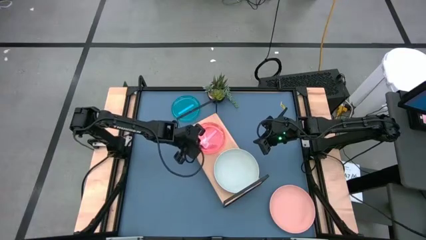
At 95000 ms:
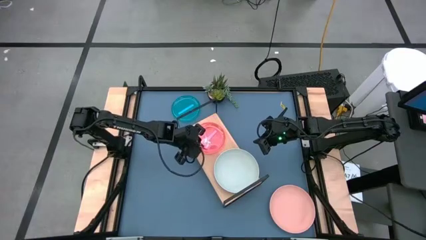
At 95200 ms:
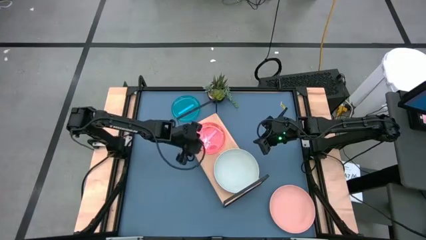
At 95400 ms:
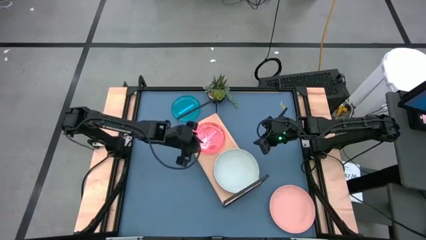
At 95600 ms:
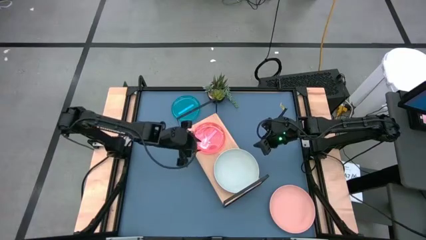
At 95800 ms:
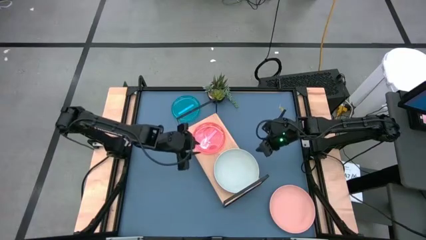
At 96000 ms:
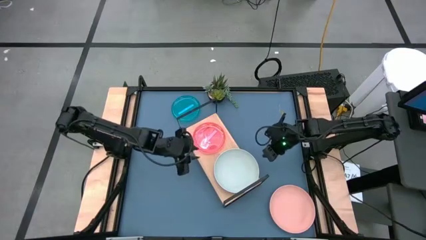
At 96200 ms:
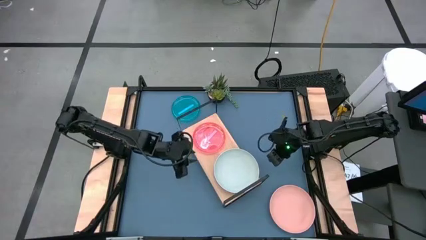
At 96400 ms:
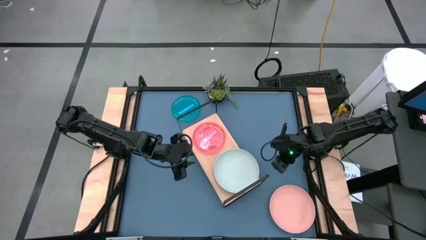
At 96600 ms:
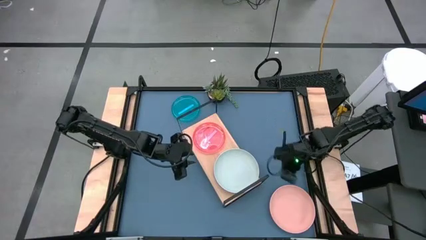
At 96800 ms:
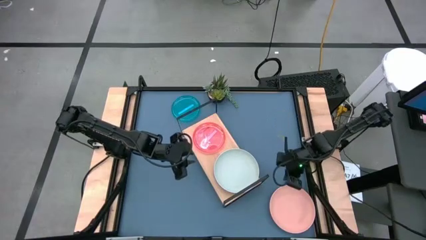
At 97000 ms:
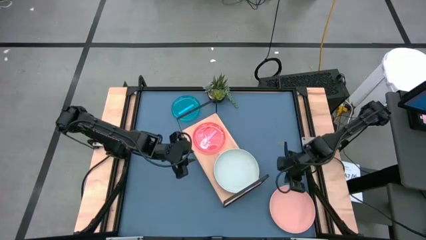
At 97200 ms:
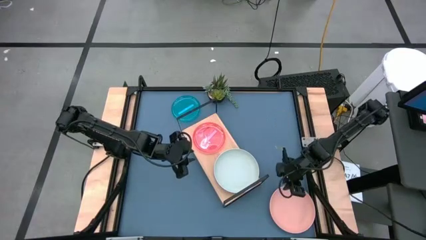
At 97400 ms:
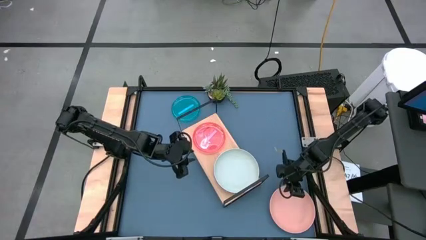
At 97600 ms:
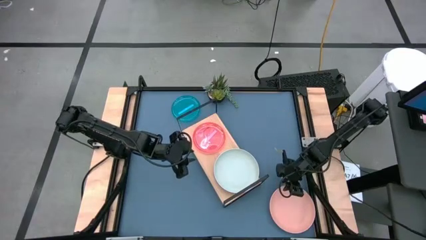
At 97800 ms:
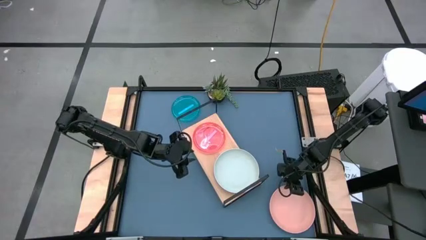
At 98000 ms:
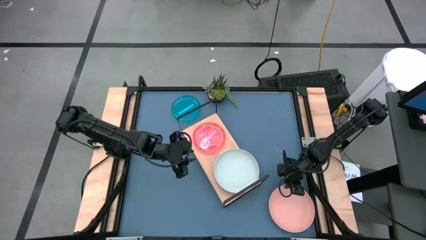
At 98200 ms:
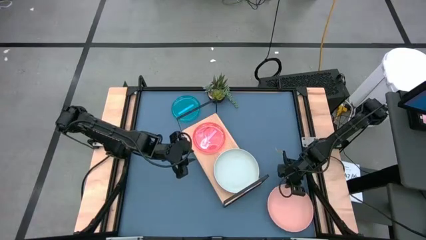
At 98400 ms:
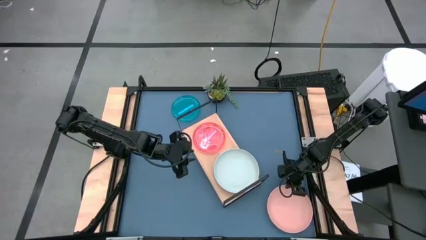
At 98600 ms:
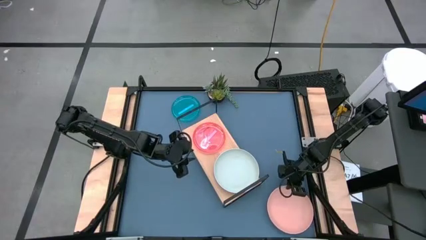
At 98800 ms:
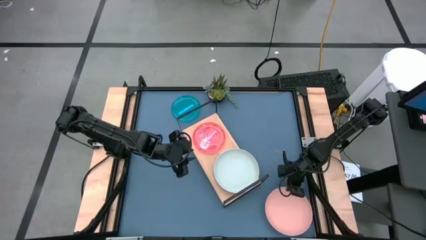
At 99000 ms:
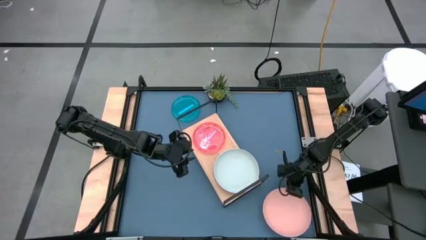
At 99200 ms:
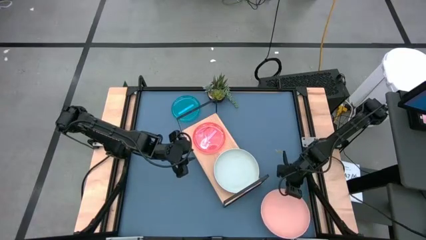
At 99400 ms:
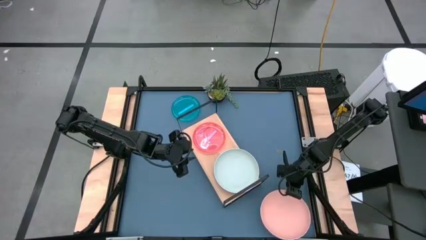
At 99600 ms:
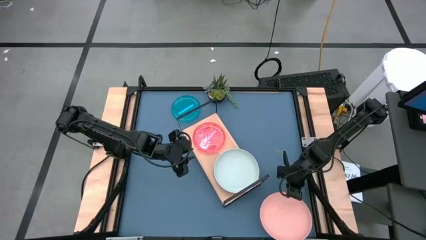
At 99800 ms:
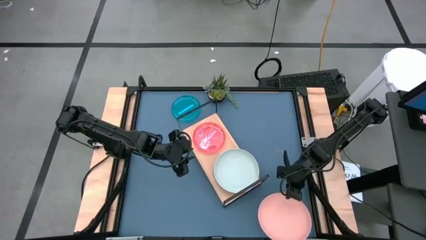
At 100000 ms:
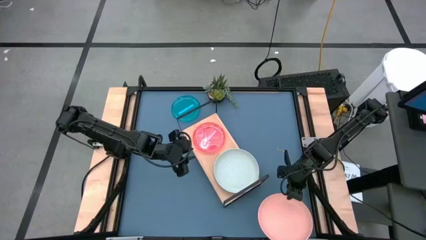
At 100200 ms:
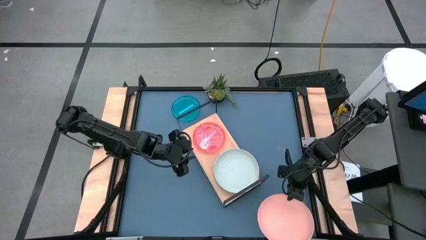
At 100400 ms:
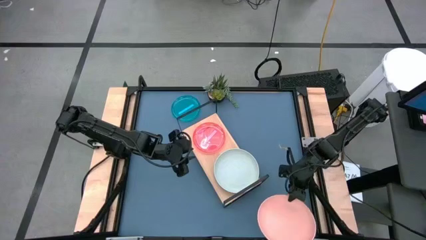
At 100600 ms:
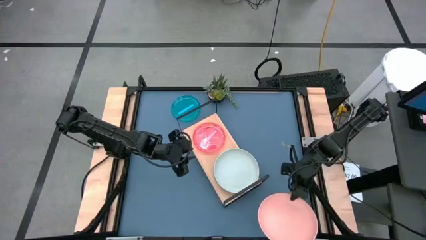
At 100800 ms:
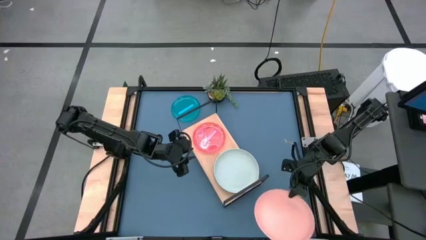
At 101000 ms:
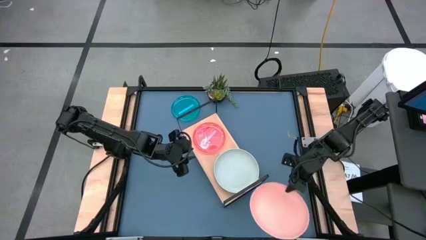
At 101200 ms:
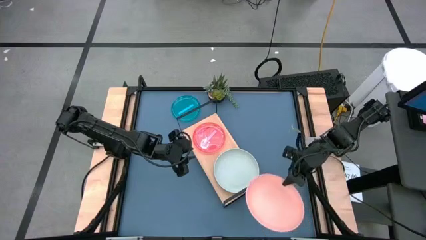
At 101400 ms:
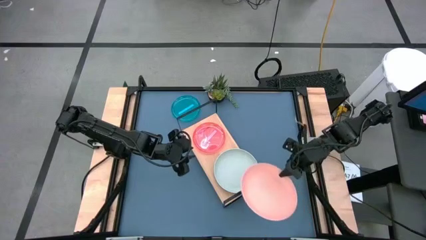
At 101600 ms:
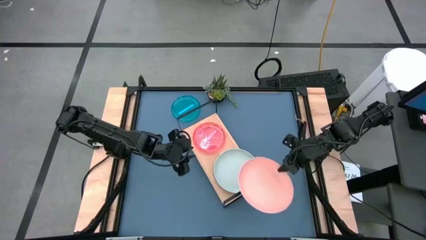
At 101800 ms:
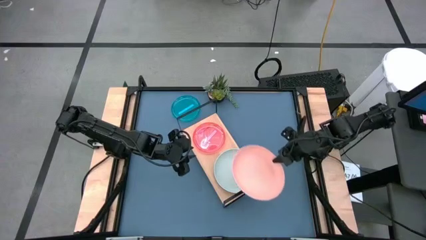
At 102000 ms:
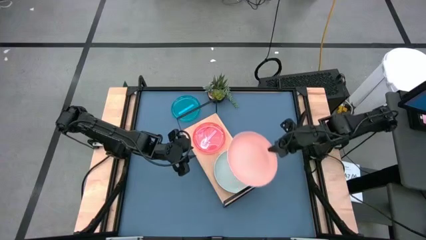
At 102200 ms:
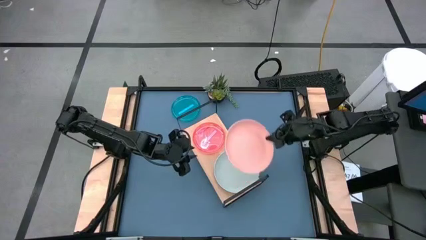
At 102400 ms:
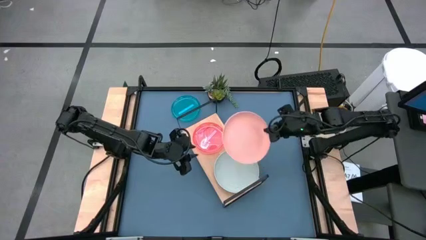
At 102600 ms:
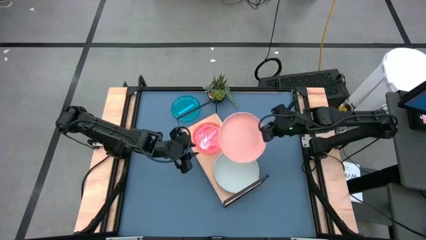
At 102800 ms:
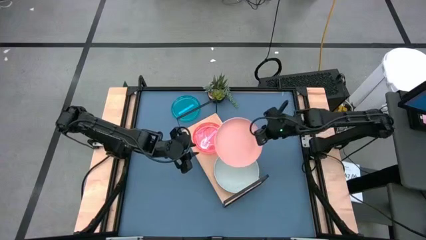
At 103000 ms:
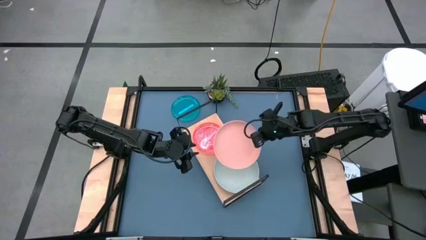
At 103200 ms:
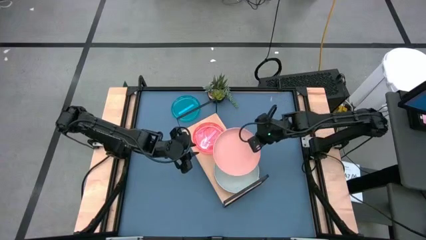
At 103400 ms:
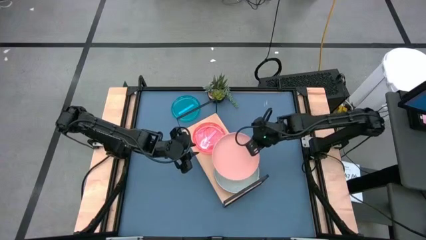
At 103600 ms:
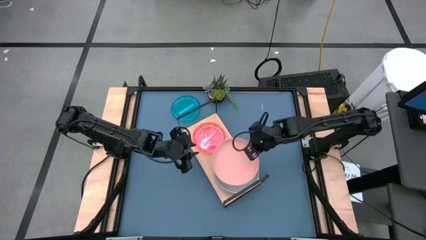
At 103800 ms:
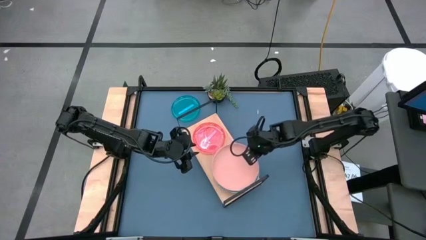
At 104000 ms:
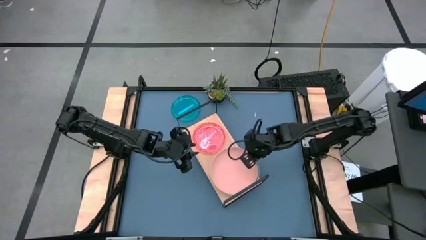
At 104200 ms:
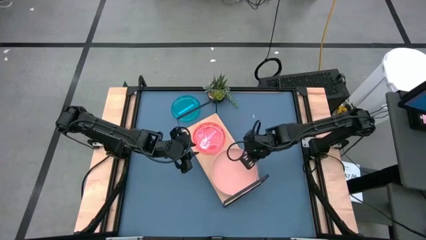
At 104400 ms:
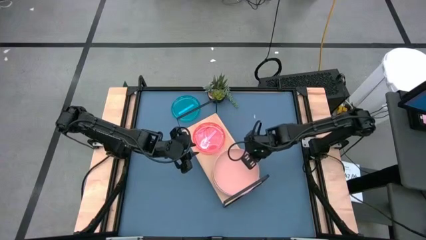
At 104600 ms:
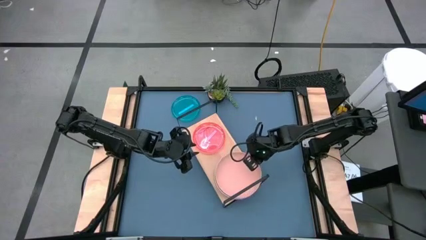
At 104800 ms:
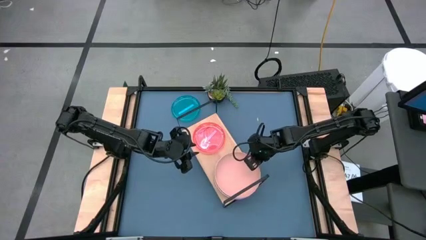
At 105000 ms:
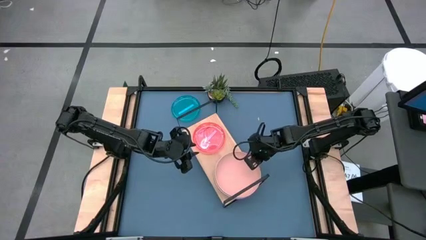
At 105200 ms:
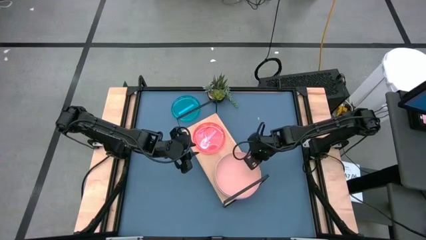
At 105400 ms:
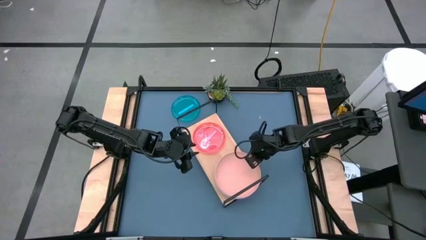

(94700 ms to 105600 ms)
Task: Place and stack plates onto a shelf
Stack the large light orange plate on the large light gray plate on the shelf

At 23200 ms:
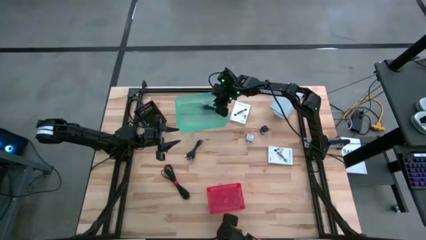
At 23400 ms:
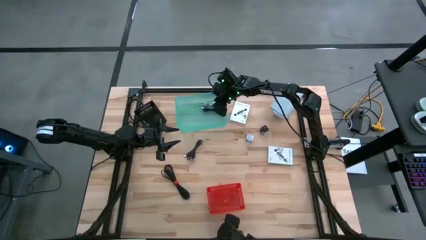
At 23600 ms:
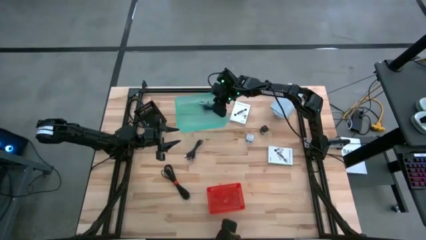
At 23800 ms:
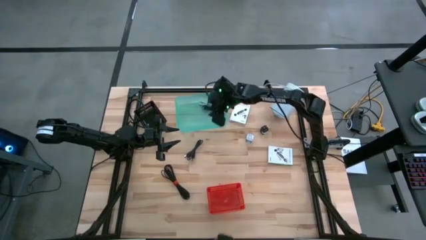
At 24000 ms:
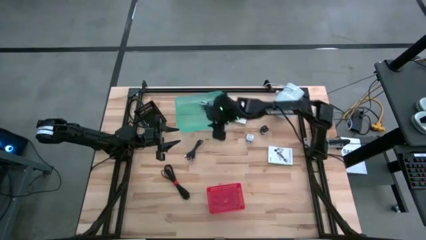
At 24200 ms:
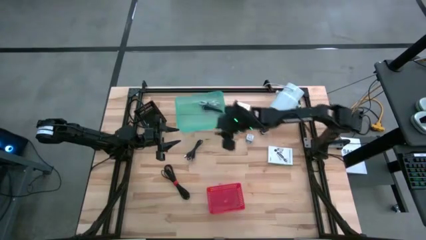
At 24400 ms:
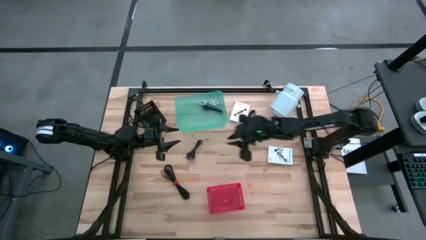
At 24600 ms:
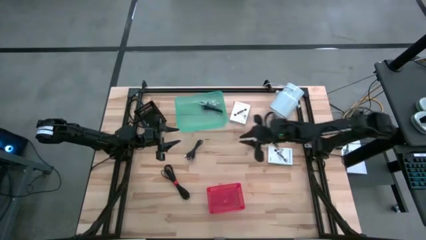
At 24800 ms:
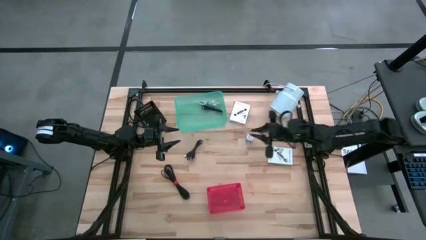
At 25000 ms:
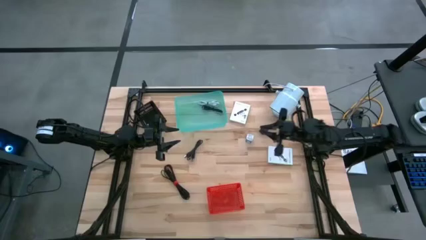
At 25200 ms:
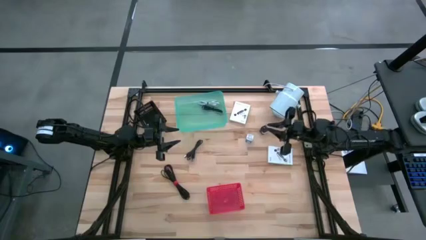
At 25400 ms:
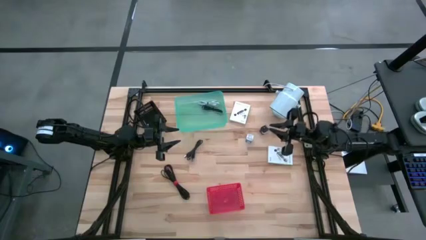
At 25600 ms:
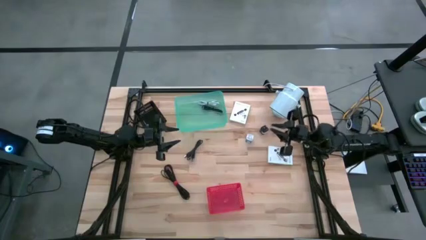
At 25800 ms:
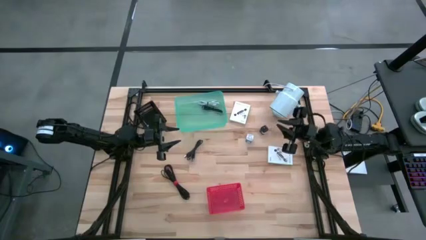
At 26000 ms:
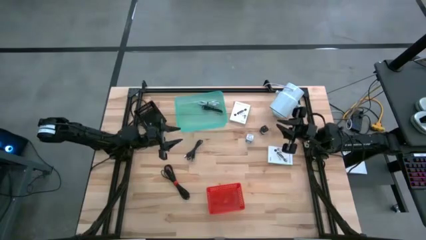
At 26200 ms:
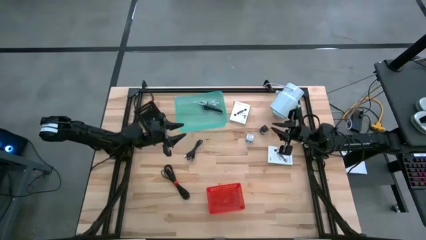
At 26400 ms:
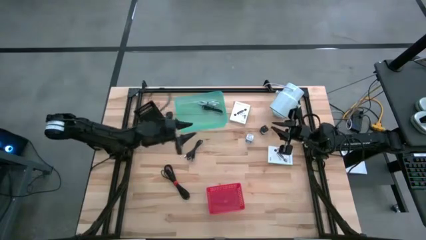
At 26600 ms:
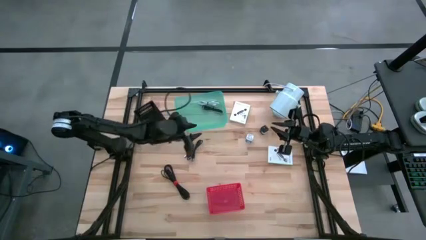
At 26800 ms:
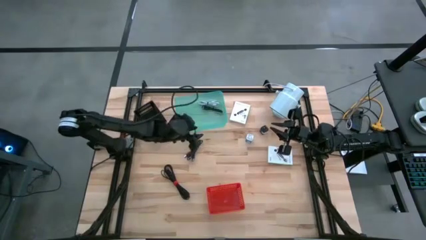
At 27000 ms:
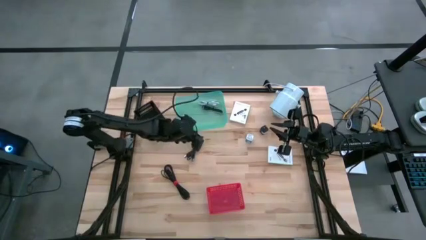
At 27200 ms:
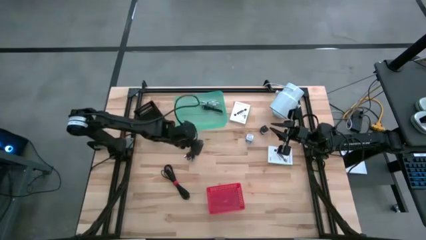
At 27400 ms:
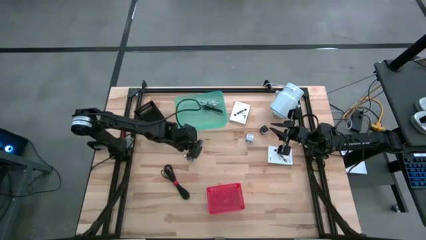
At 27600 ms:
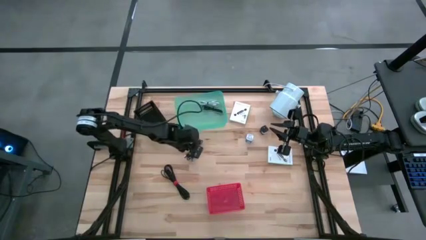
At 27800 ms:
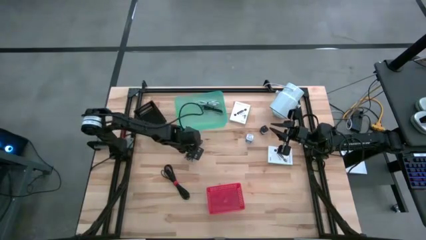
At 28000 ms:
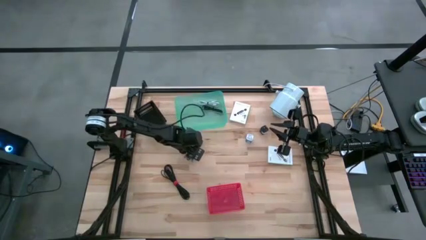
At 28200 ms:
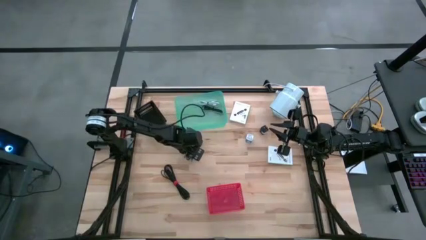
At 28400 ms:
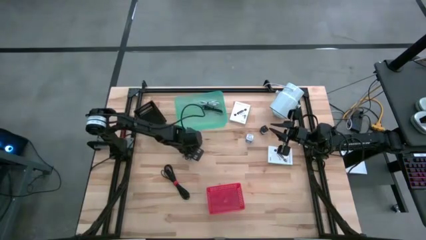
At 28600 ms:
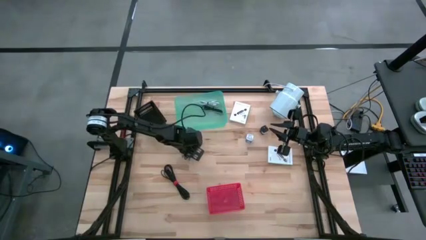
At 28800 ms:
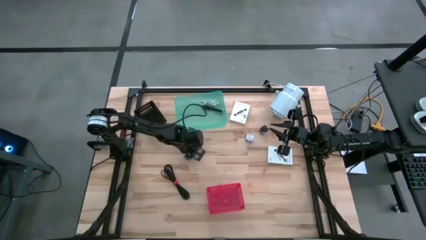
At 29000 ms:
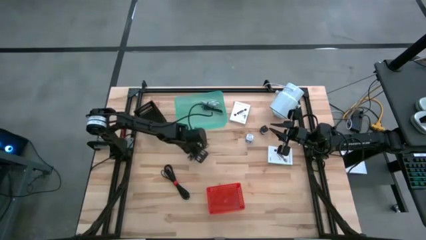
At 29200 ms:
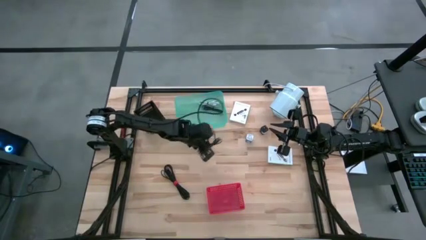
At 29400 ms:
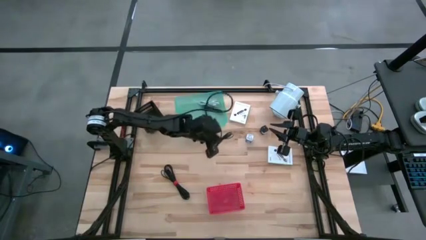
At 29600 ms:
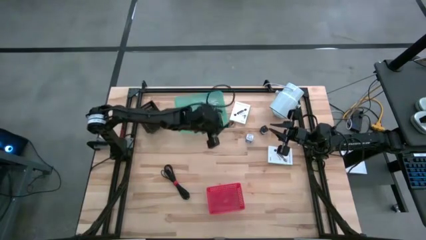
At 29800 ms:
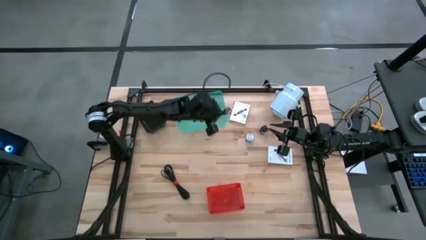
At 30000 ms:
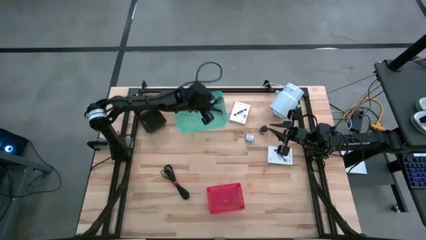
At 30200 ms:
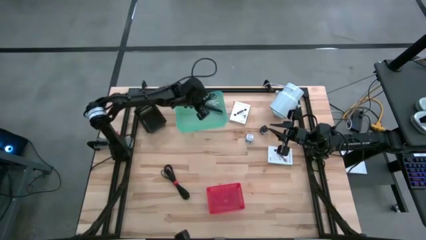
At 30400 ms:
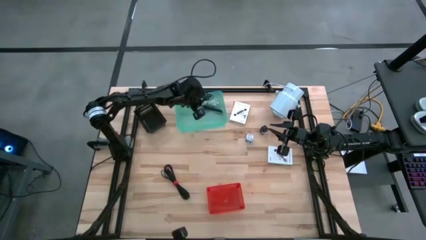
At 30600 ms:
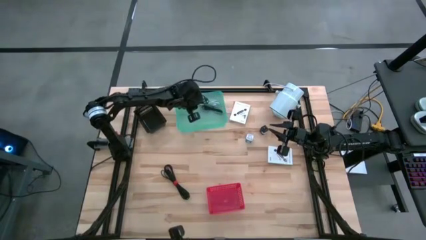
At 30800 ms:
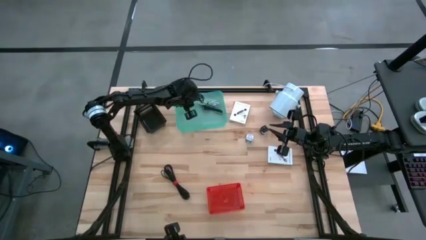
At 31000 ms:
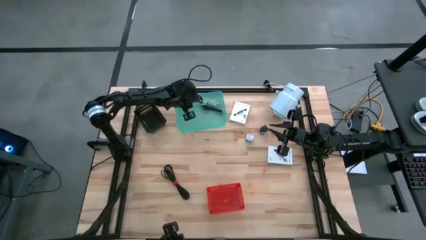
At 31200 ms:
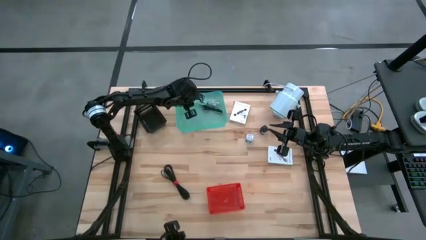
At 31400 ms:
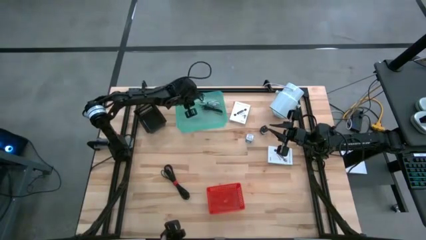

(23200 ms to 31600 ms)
Task: Pick and place items into bin
Put the top black charger cable into the green bin
